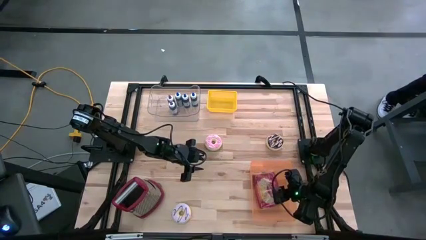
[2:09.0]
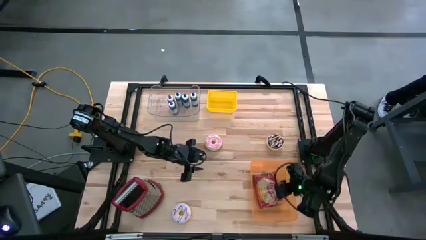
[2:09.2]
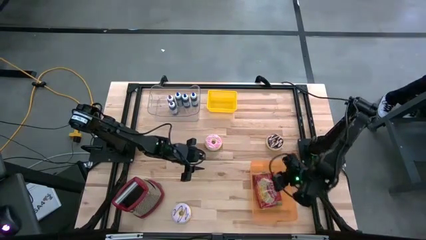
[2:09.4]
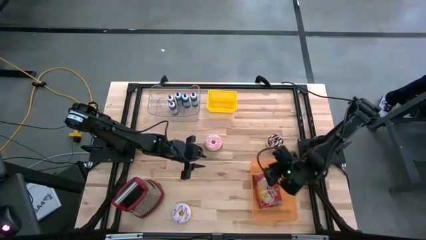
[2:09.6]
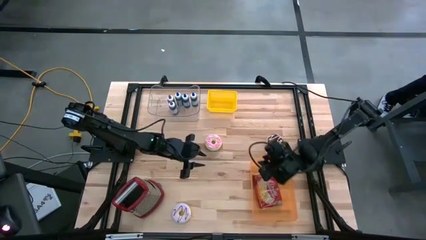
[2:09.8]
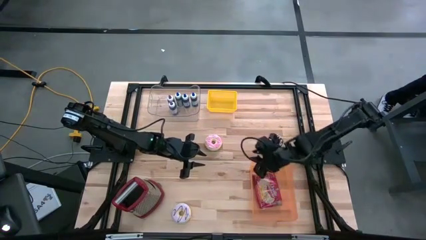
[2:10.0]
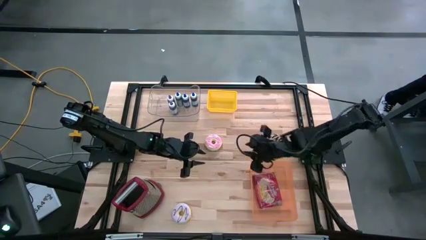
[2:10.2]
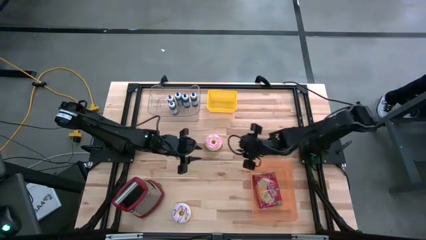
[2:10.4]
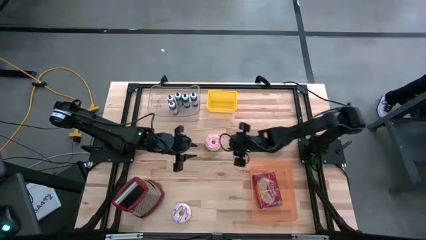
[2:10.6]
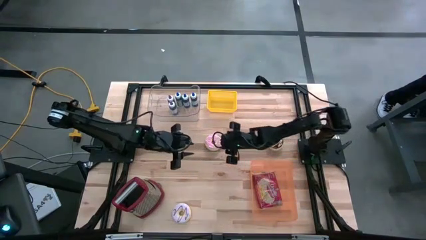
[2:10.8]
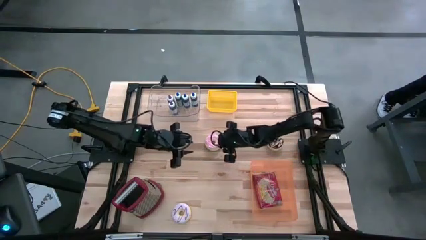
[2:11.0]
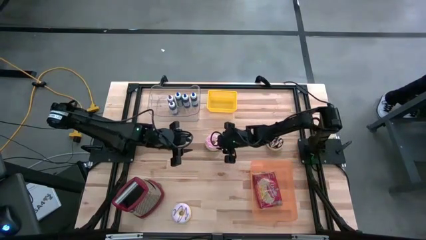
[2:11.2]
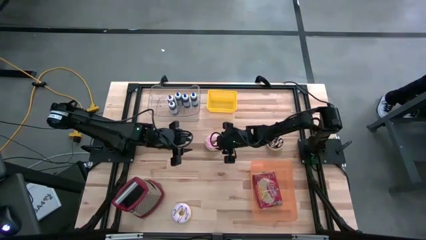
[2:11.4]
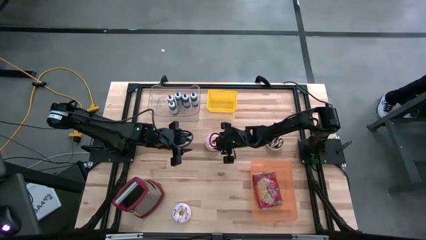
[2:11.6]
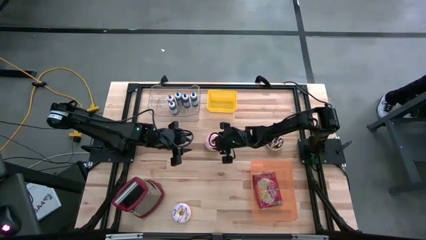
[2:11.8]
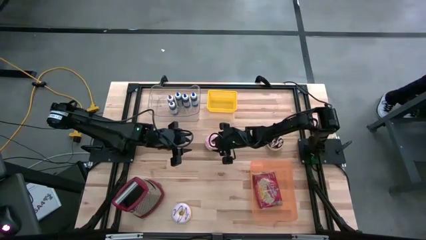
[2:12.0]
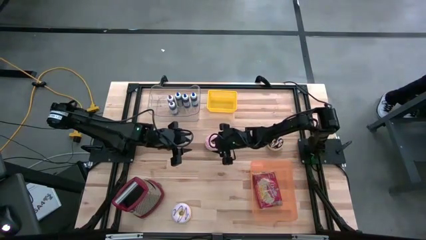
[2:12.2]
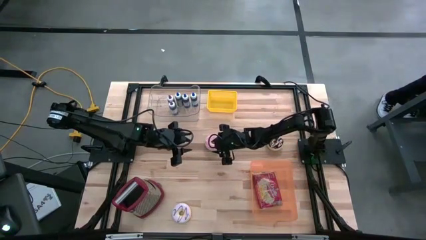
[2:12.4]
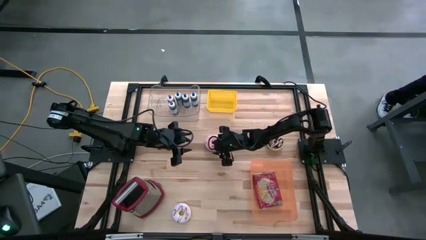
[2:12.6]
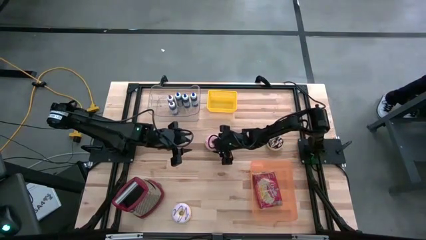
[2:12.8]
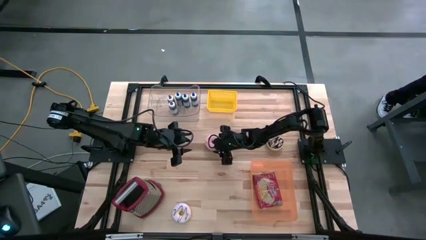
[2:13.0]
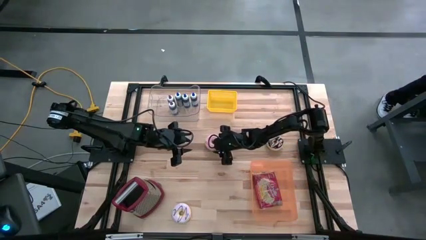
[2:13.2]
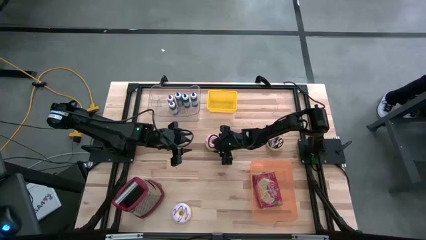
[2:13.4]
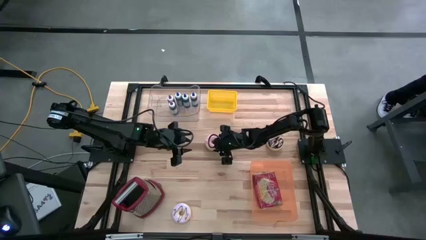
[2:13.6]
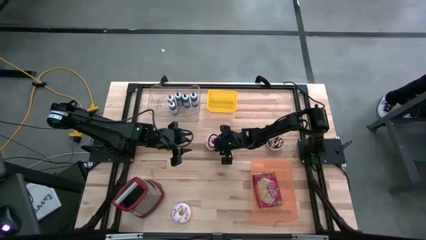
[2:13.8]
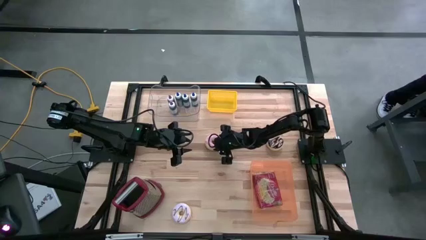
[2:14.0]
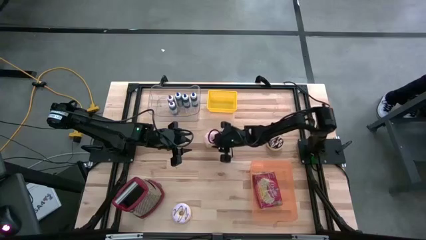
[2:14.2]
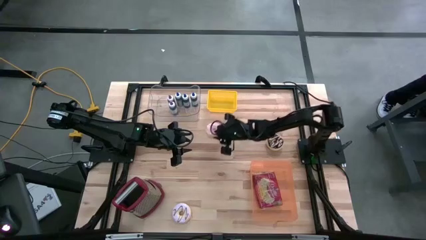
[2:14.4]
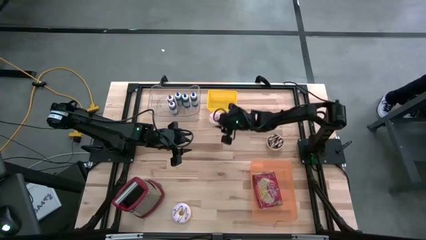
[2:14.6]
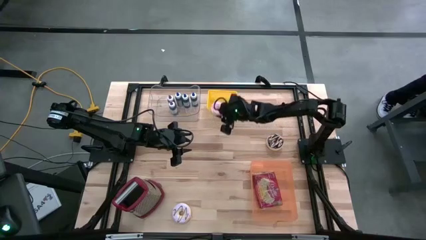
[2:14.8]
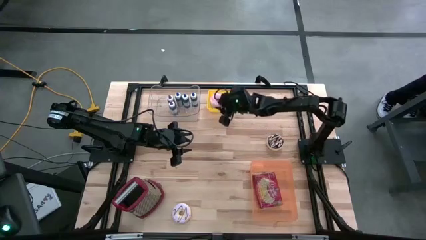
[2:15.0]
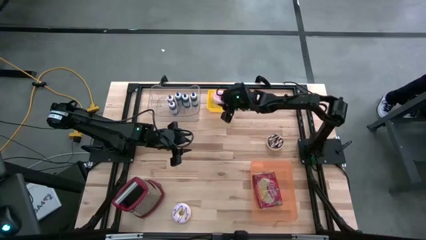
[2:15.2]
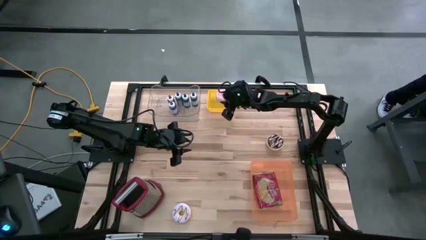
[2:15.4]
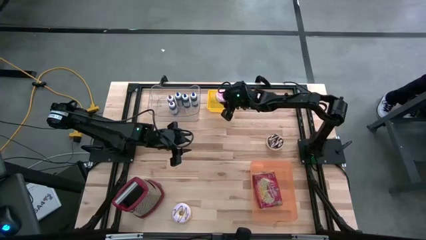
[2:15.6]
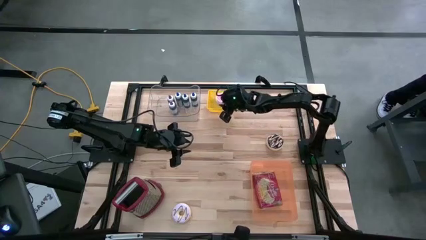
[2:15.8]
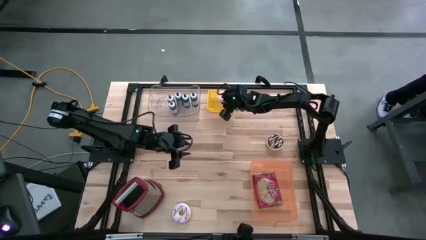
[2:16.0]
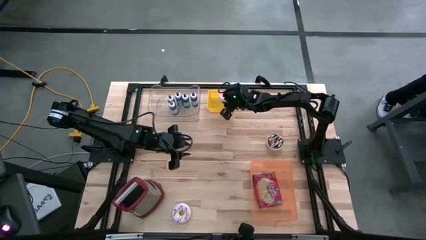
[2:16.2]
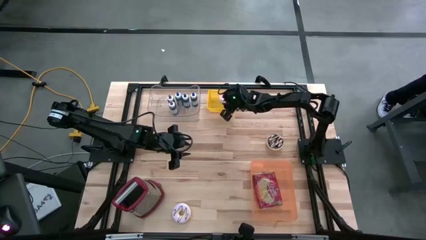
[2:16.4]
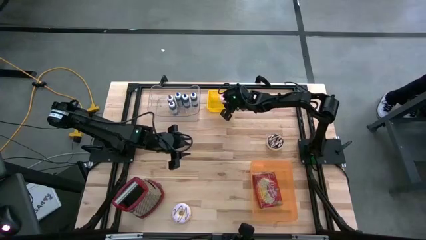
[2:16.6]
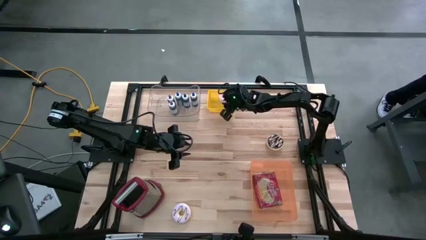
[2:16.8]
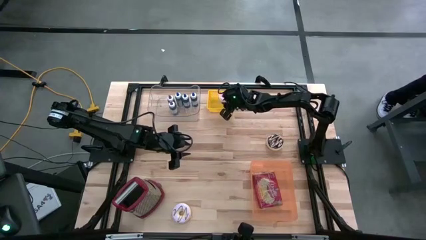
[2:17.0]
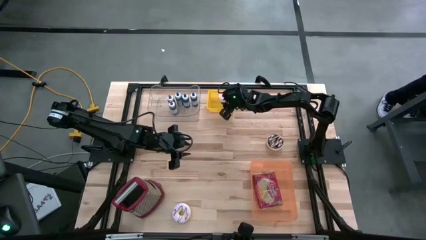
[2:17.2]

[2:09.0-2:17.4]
Put the pink donut into the yellow bin

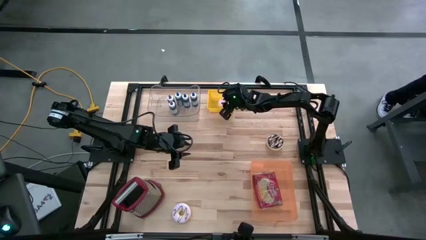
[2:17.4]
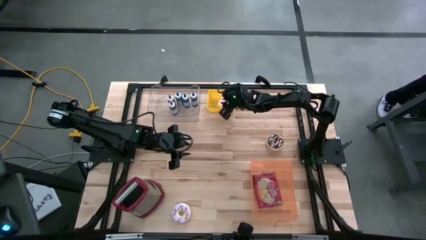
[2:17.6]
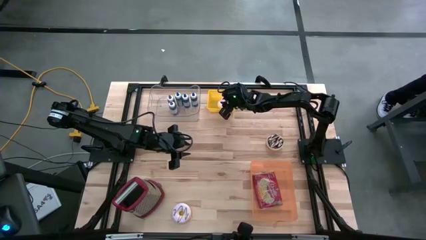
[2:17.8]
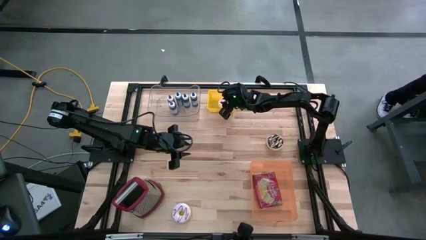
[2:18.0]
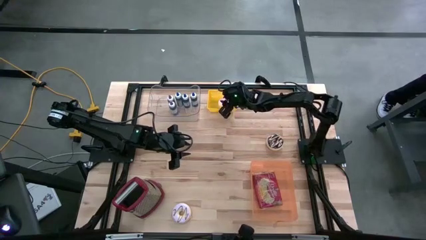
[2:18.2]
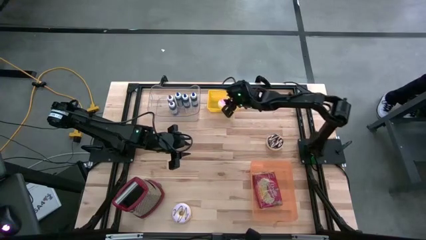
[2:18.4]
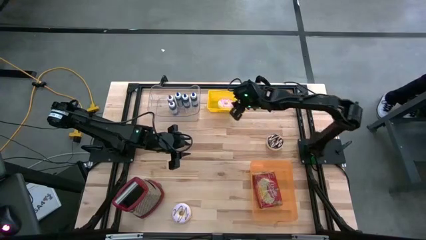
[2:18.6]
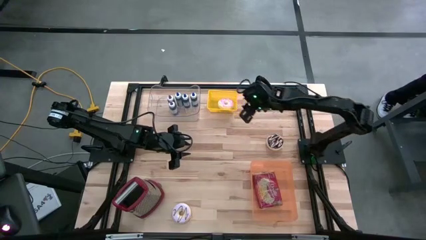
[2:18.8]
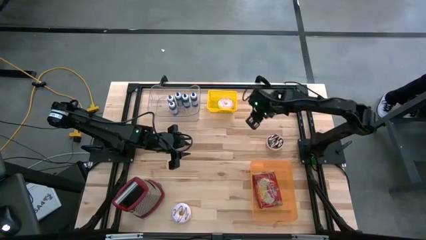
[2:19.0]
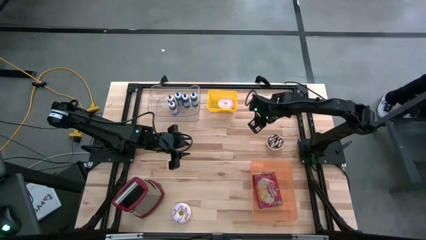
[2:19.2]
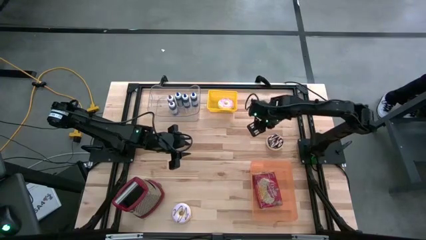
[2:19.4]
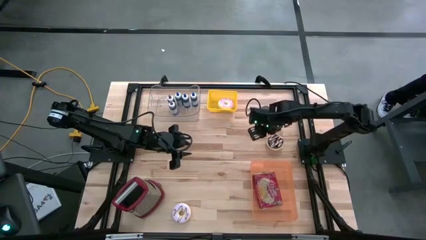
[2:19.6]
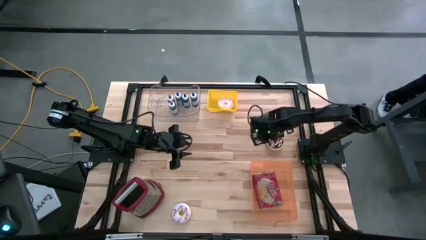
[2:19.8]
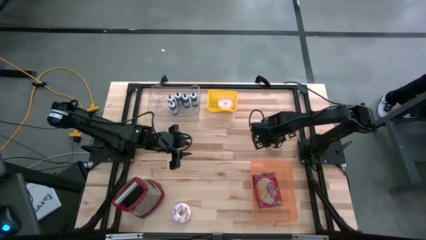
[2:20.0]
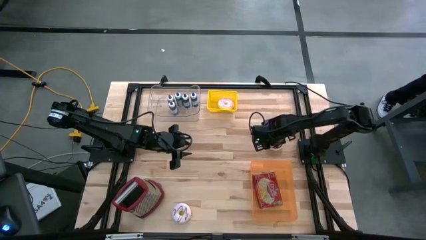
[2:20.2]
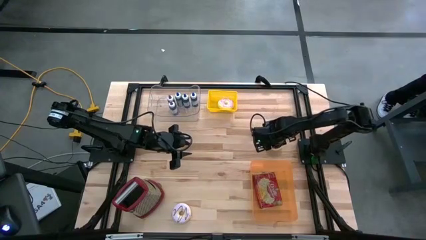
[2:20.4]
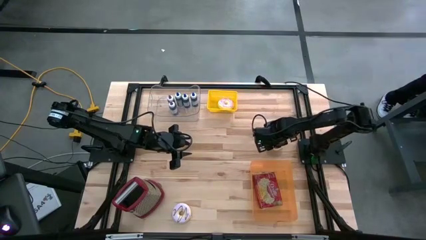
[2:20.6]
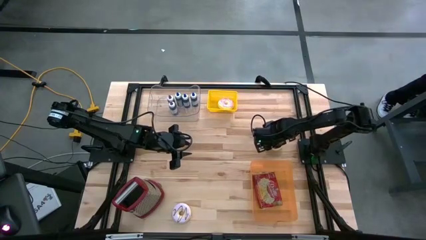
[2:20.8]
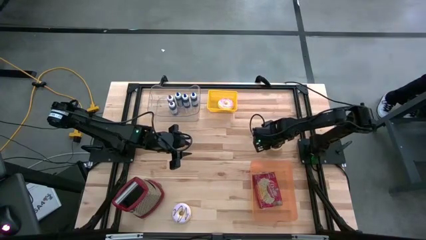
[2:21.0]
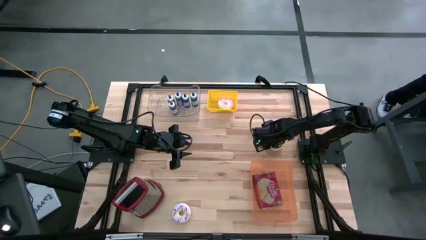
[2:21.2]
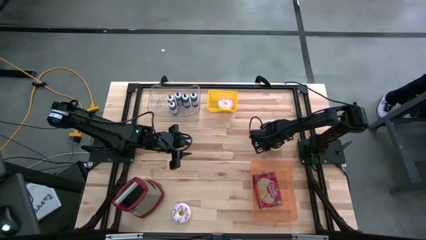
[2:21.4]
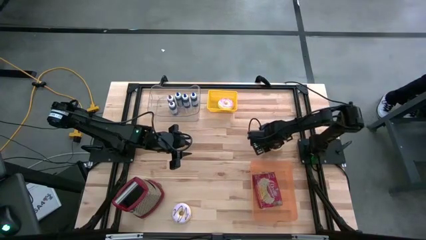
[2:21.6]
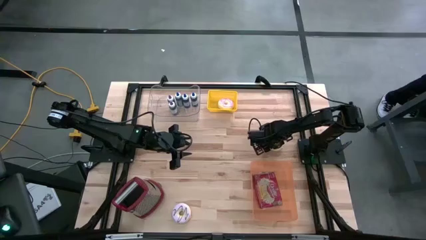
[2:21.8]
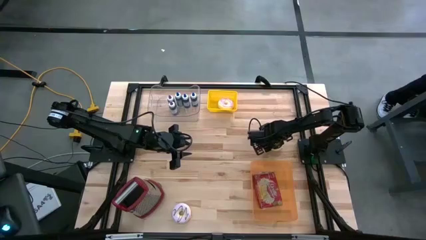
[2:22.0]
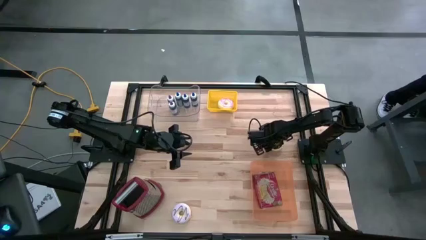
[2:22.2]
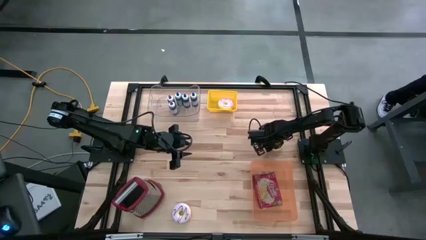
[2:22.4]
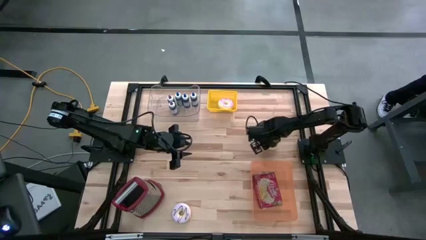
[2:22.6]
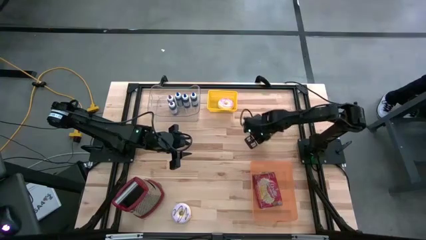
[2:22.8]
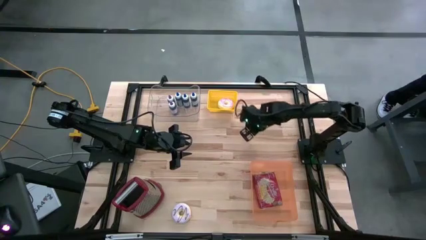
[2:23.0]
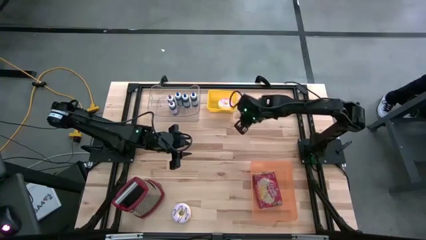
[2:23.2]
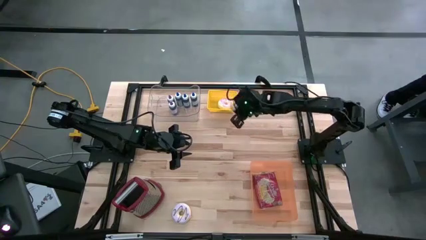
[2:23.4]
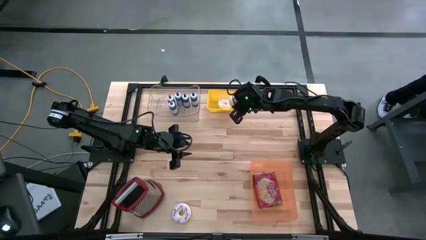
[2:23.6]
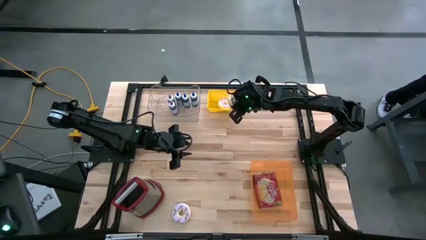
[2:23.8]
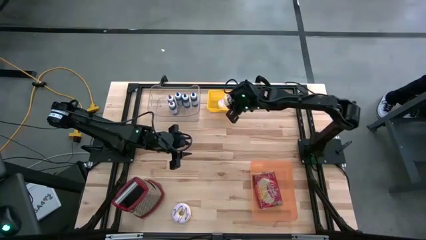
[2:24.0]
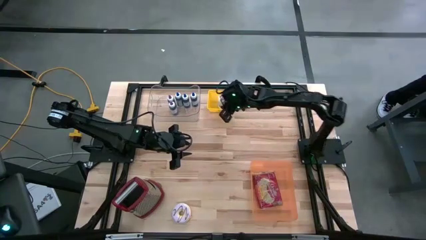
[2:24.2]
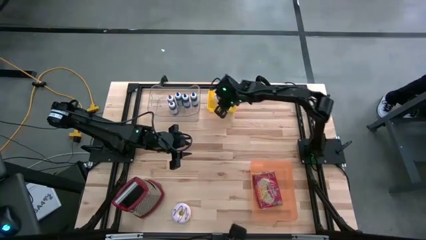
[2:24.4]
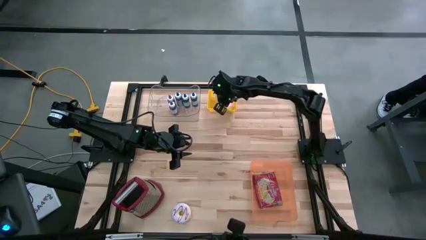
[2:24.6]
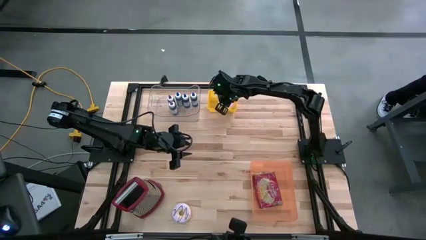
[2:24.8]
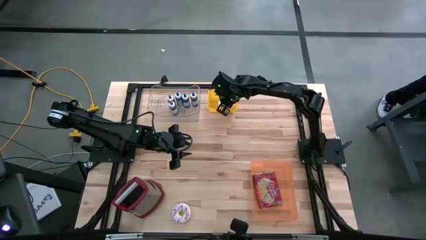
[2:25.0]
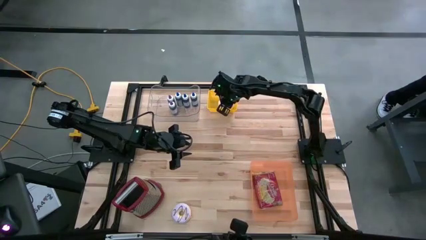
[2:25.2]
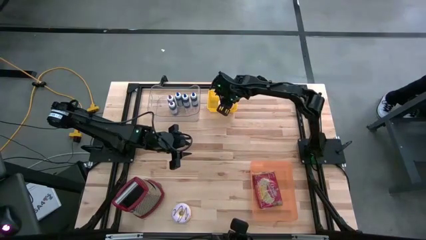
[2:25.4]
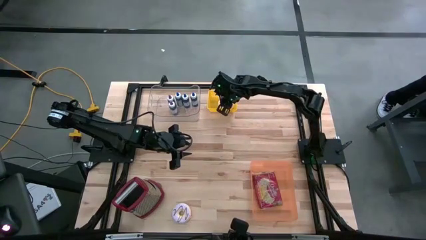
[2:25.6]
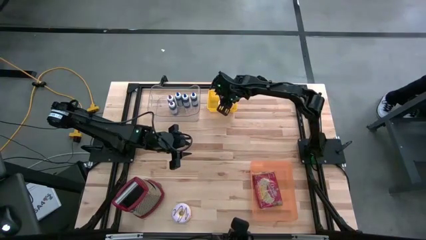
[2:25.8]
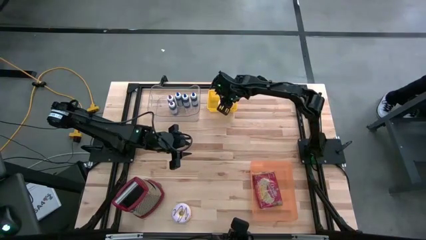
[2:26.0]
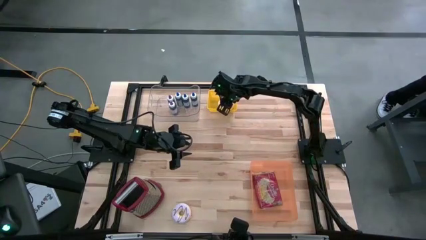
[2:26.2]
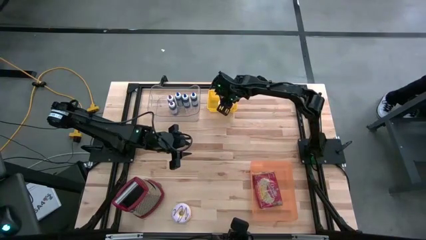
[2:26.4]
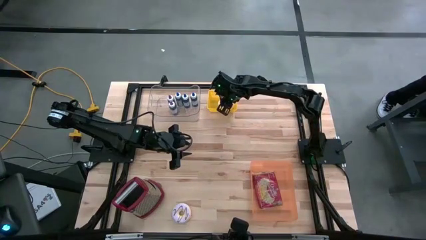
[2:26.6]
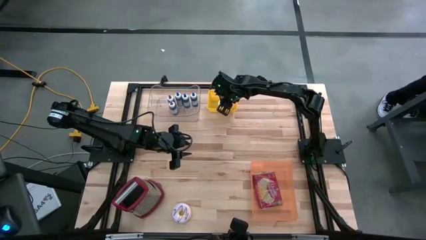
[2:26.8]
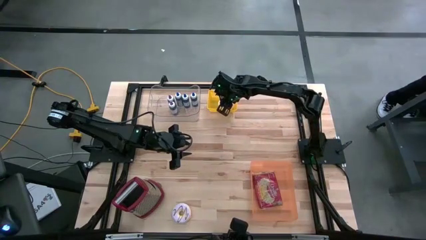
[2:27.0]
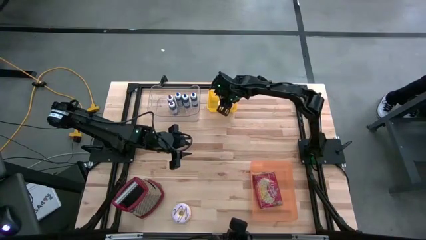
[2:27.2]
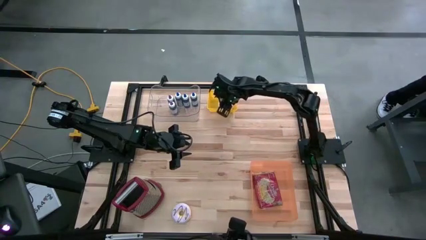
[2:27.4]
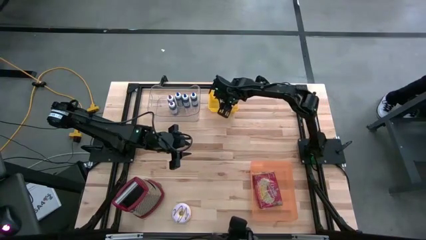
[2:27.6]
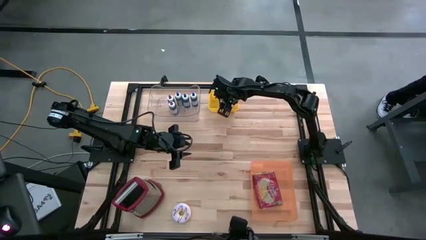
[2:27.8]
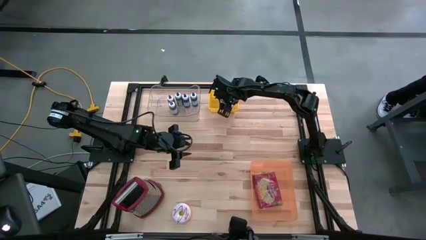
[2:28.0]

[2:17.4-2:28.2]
Put the brown donut into the yellow bin
